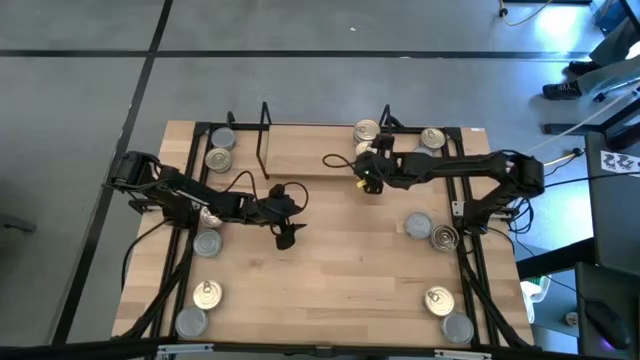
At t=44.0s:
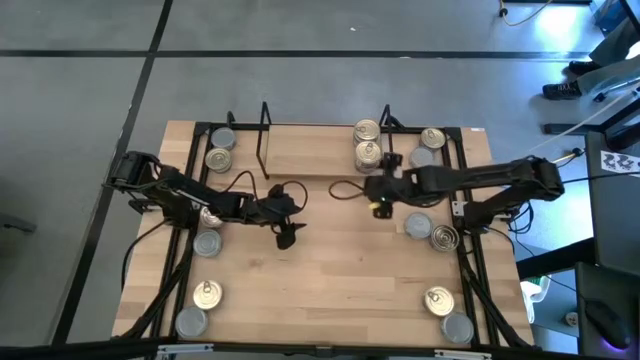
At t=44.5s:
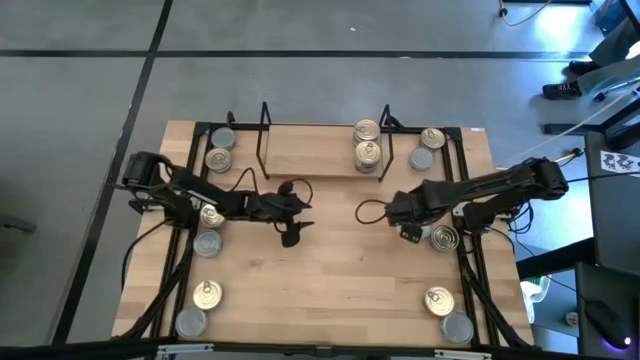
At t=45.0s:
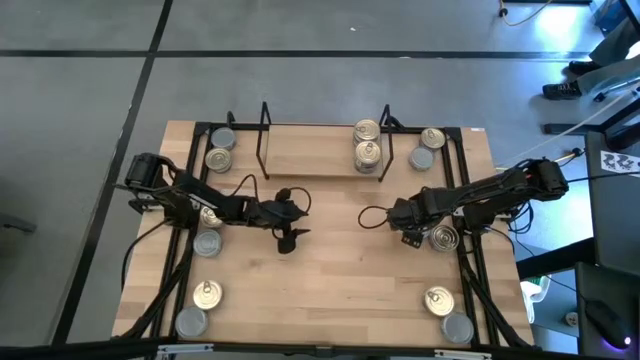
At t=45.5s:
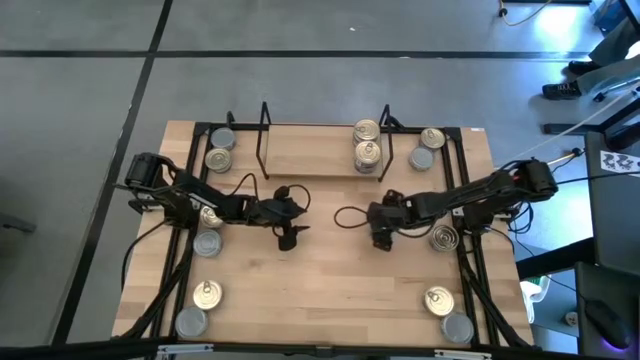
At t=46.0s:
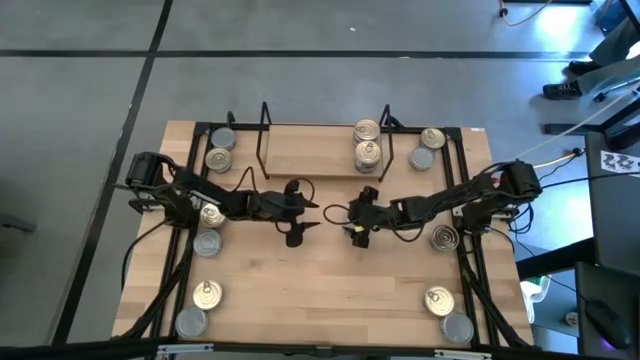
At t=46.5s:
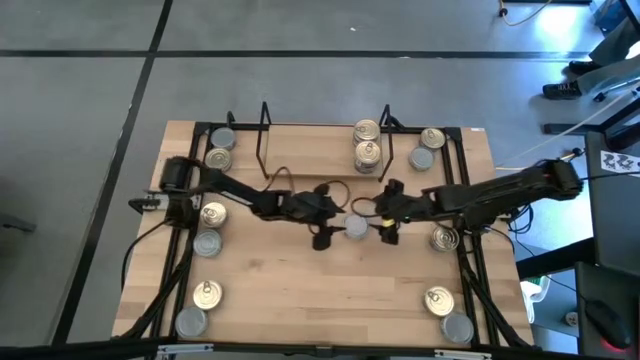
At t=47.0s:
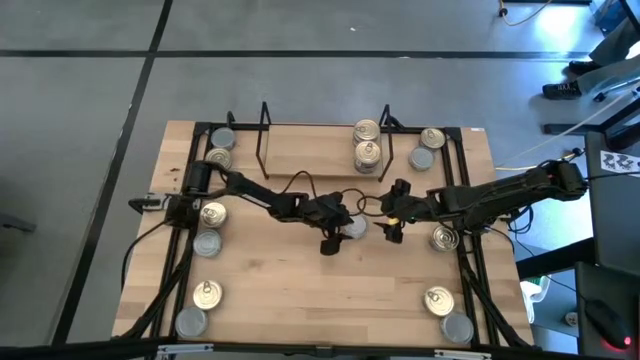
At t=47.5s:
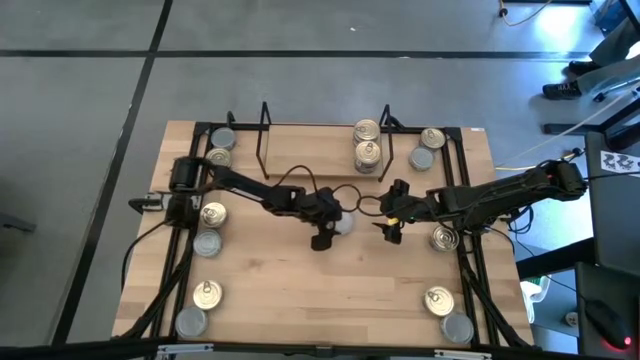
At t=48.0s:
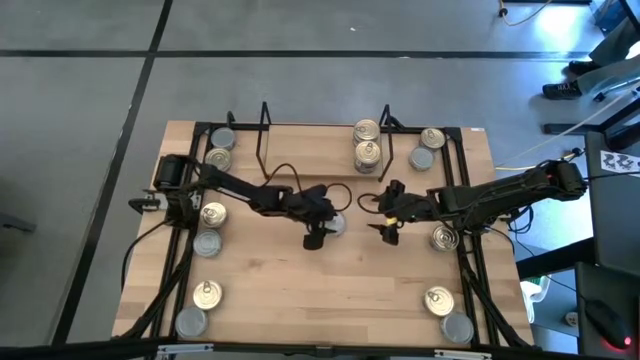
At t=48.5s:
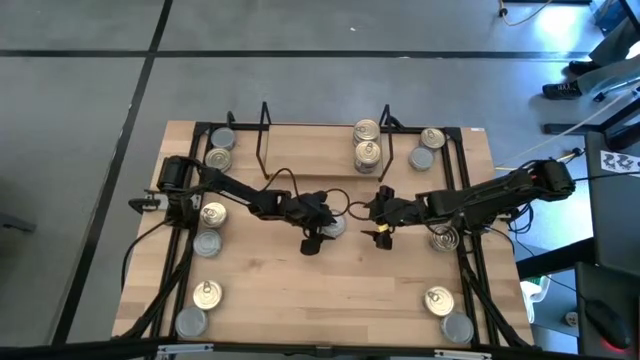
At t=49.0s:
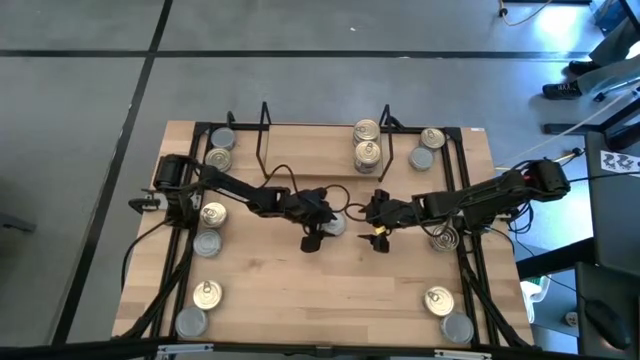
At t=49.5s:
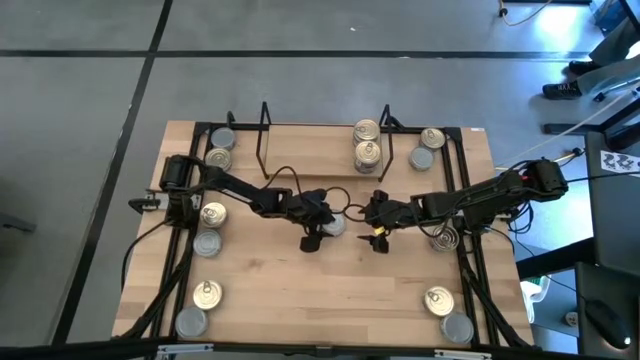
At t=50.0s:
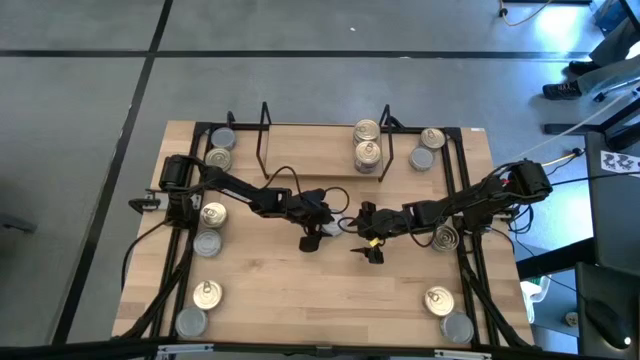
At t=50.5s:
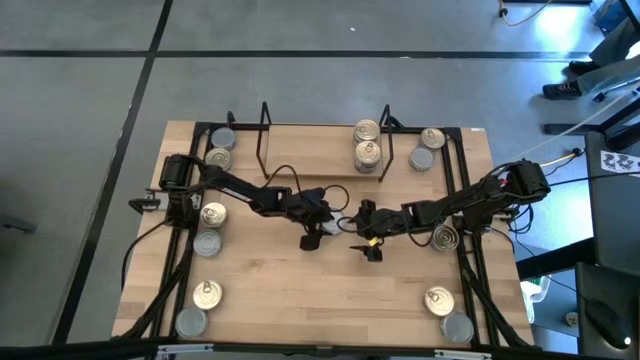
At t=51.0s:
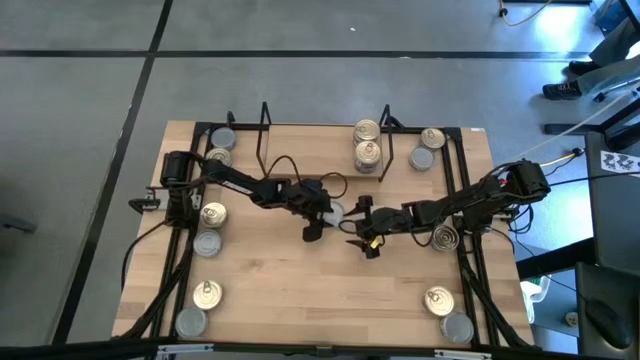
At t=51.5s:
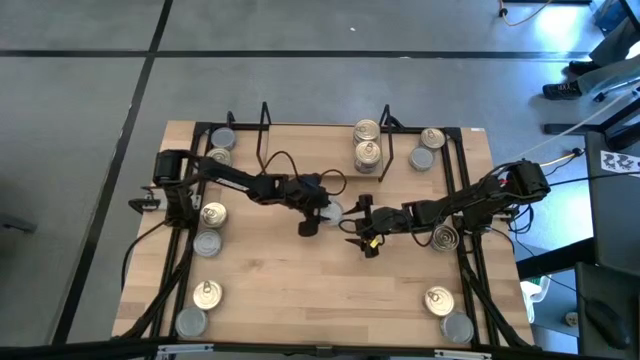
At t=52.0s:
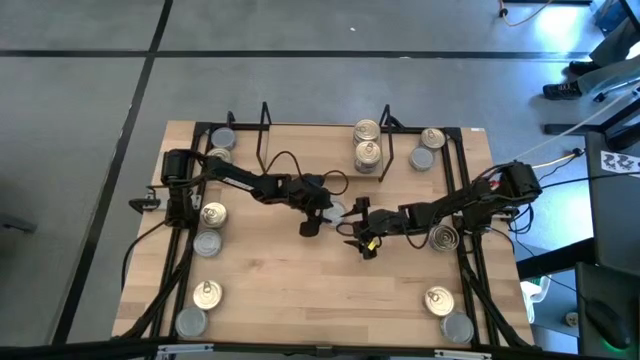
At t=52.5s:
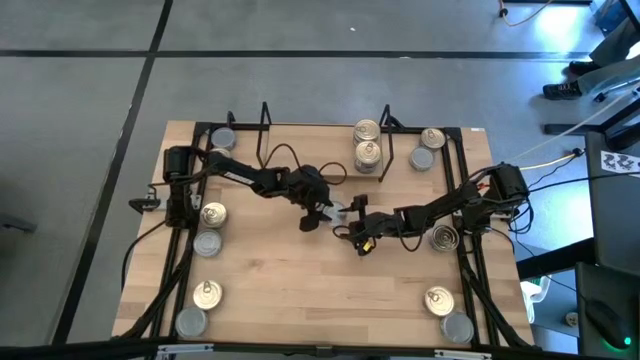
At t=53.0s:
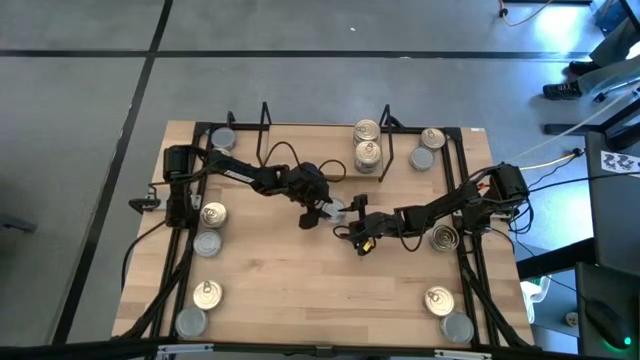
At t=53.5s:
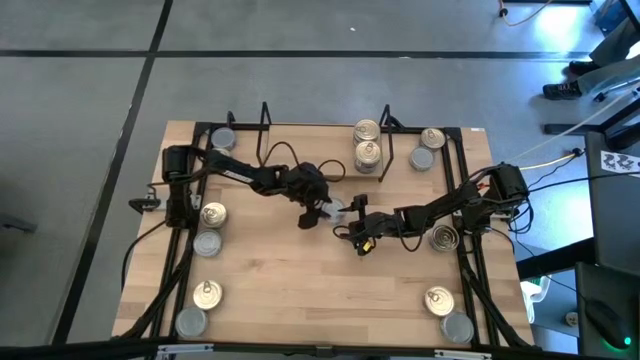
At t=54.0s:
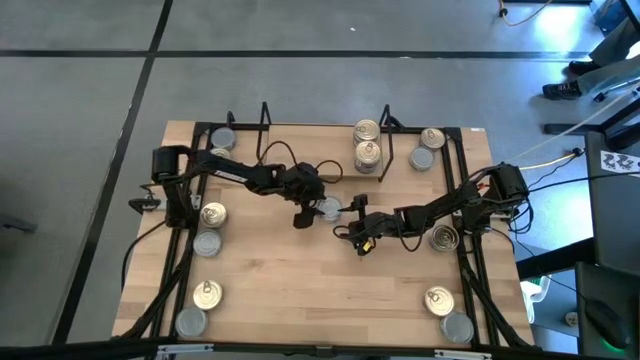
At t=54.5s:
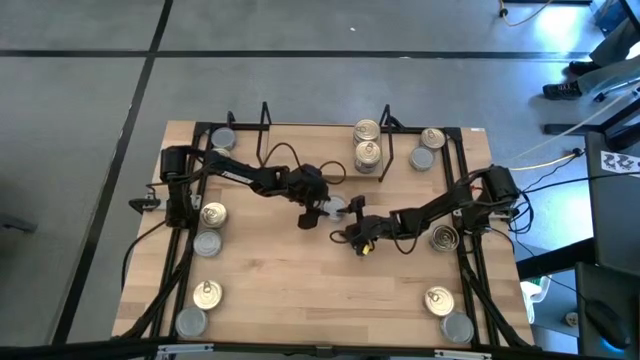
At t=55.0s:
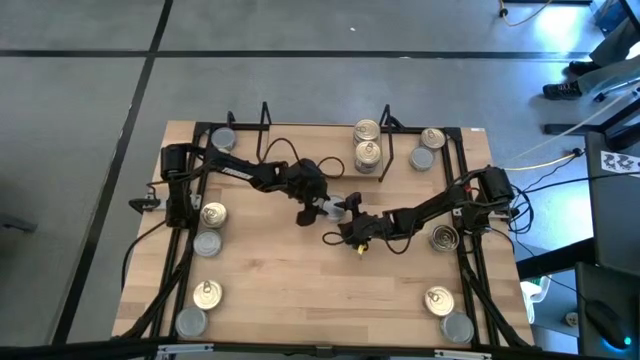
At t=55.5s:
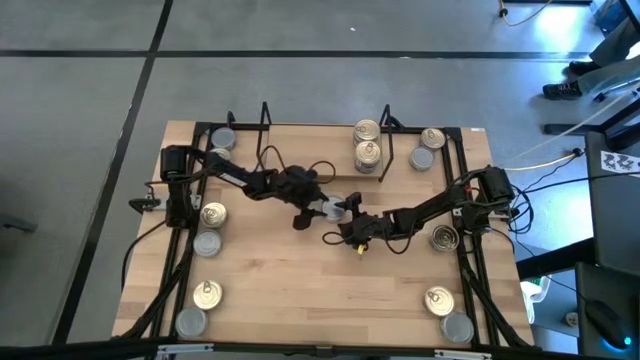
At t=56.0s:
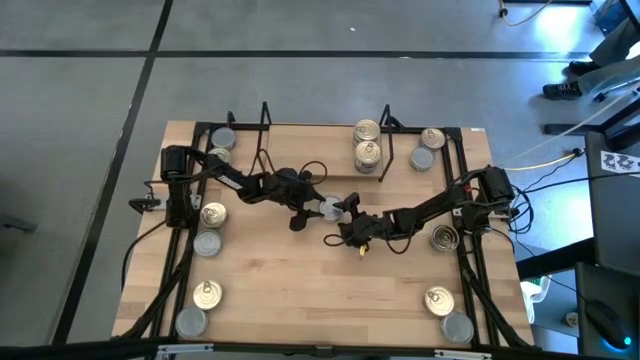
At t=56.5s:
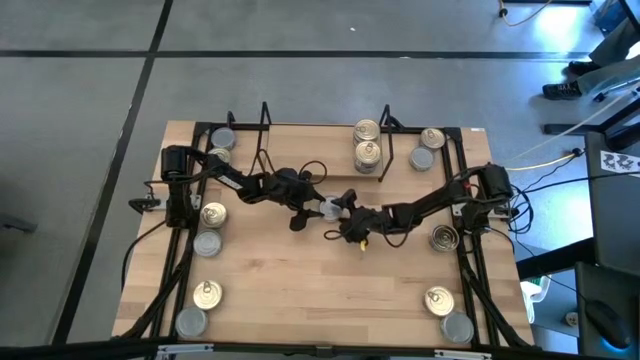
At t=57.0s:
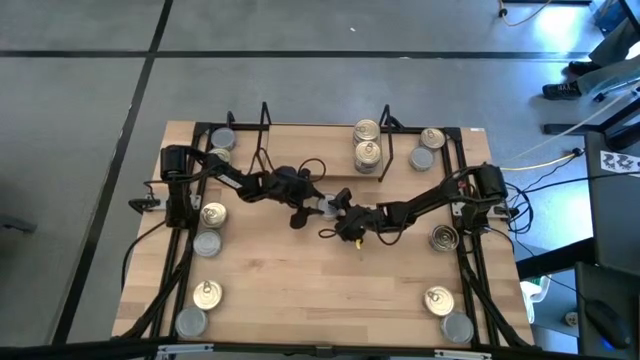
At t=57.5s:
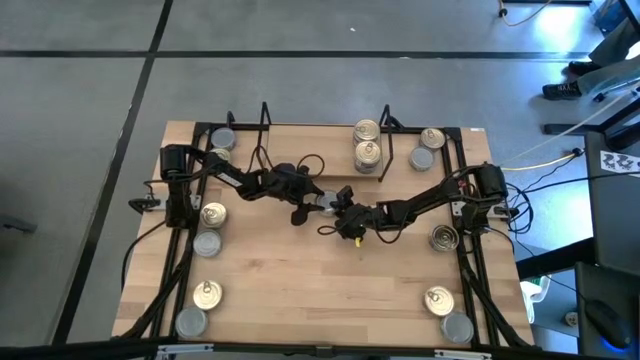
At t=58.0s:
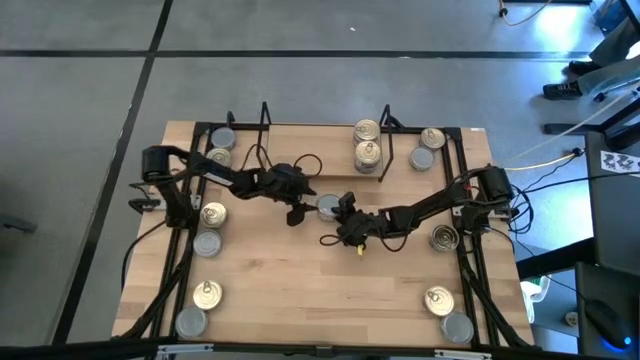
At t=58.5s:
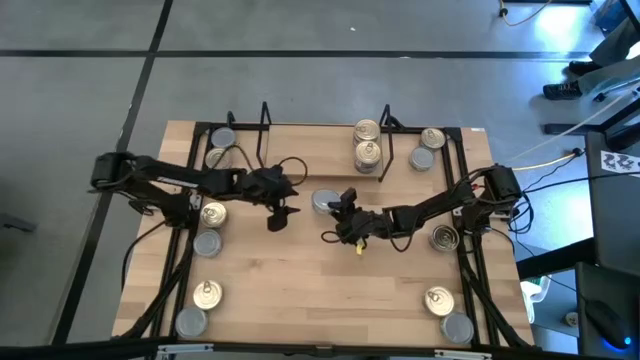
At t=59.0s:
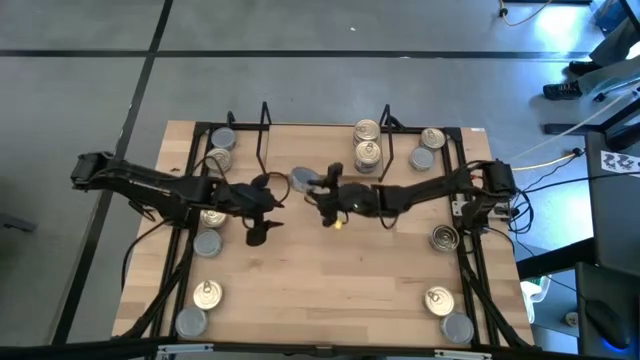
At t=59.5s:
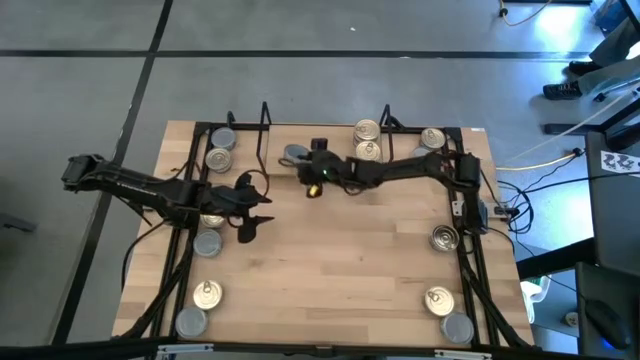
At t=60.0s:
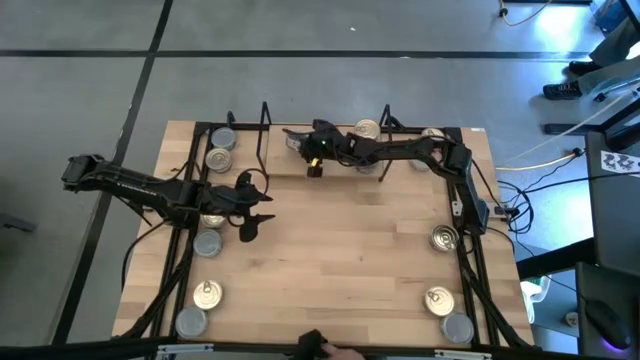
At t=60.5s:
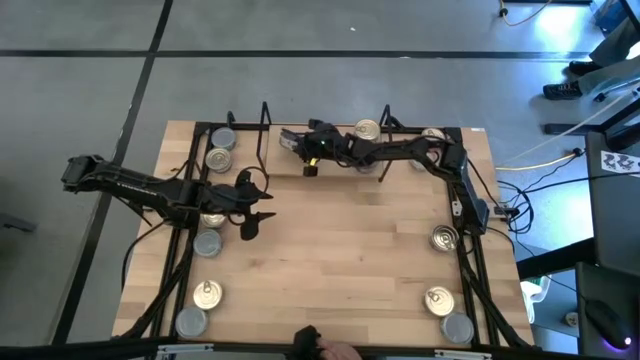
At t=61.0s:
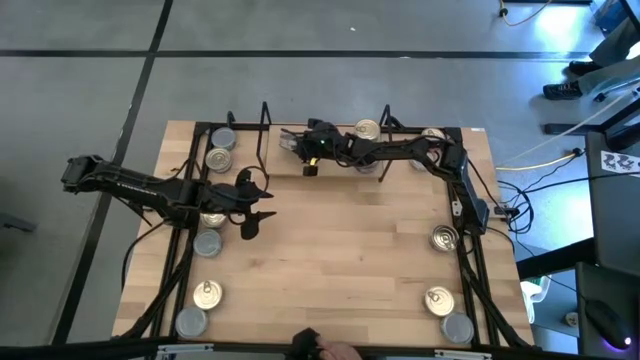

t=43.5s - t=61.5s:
Task: Stack canned seafood by type on shelf
Put the green tuna can on the shelf
